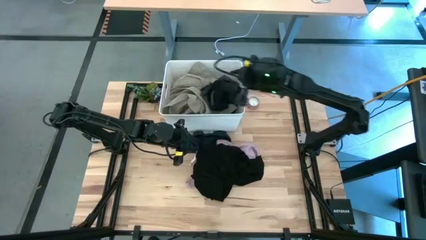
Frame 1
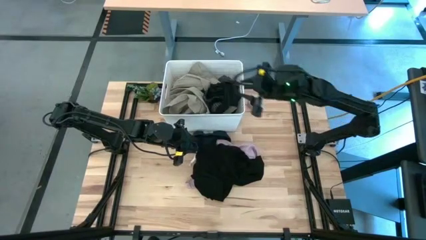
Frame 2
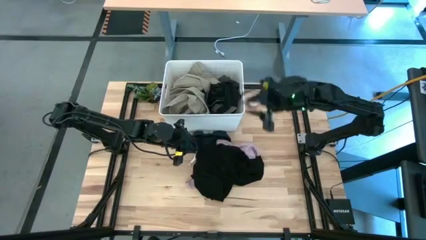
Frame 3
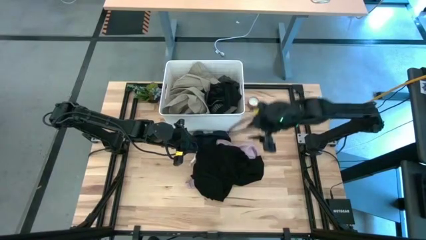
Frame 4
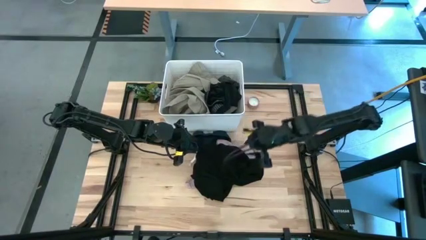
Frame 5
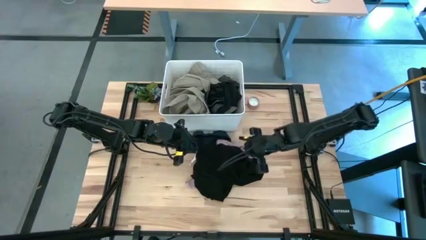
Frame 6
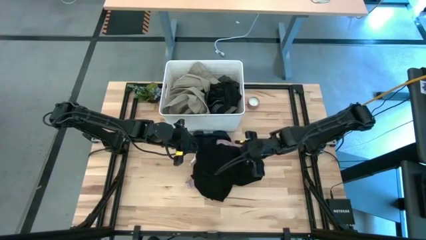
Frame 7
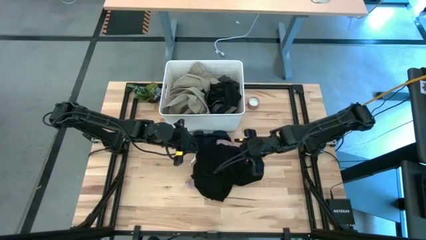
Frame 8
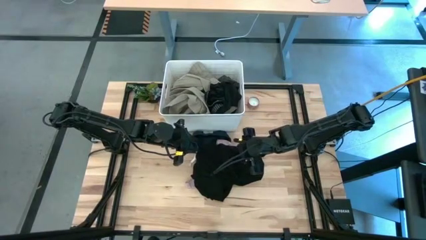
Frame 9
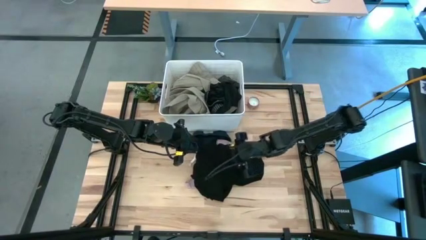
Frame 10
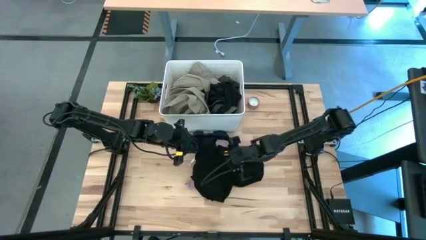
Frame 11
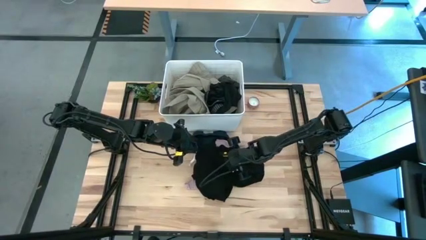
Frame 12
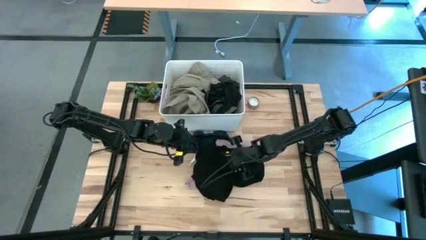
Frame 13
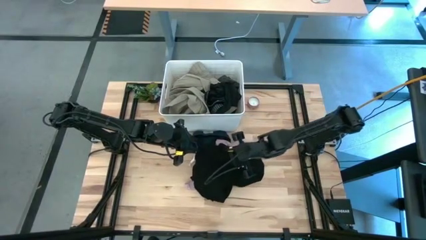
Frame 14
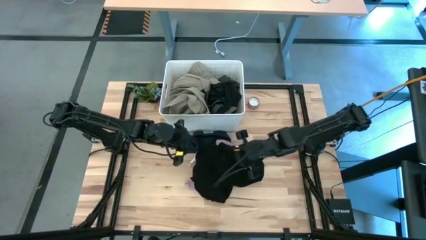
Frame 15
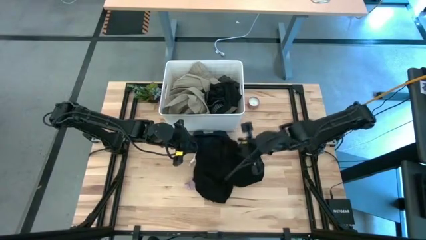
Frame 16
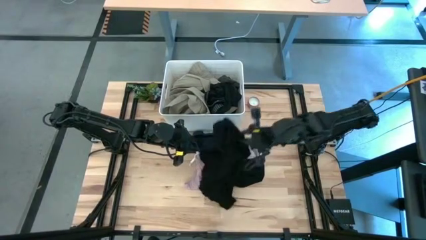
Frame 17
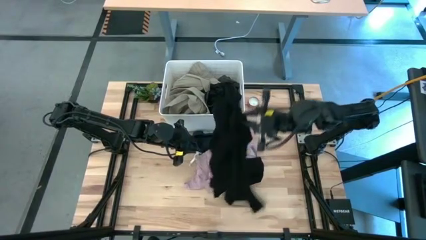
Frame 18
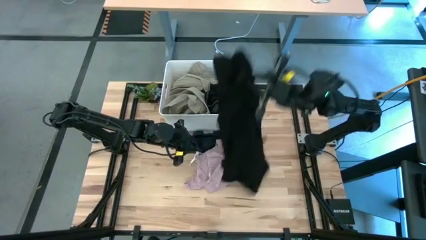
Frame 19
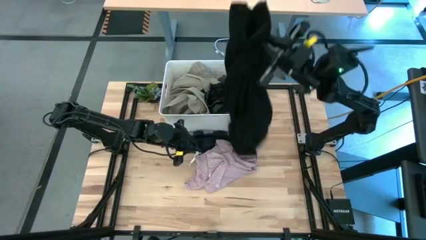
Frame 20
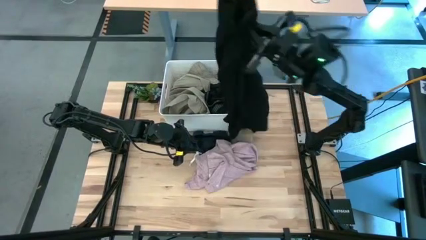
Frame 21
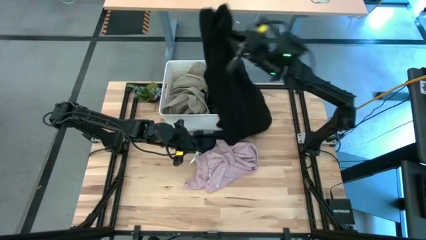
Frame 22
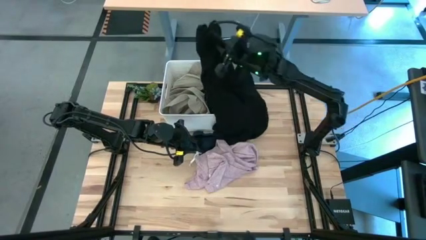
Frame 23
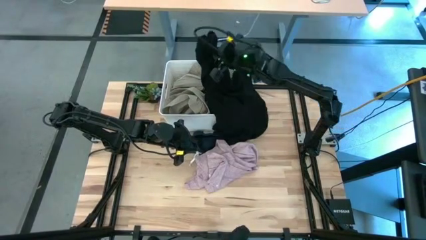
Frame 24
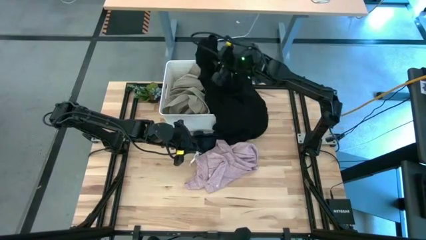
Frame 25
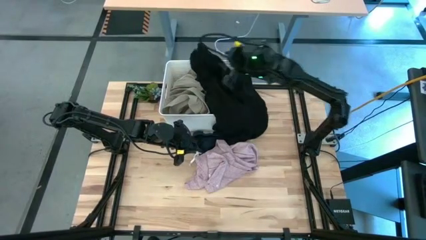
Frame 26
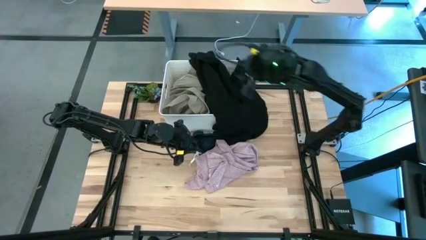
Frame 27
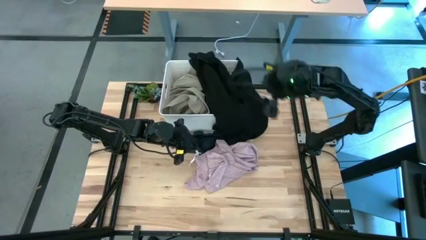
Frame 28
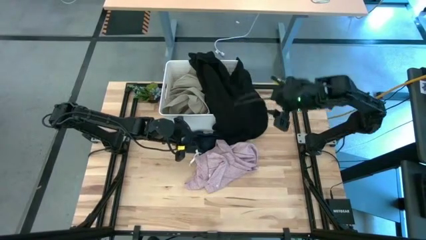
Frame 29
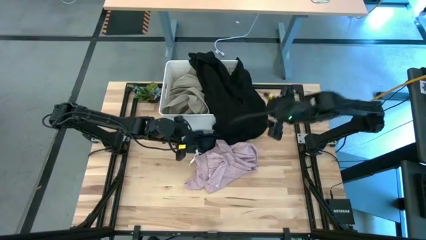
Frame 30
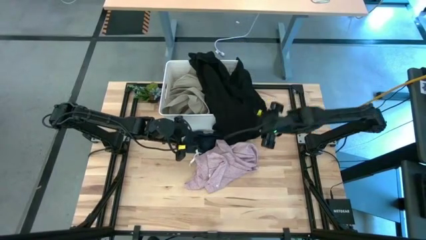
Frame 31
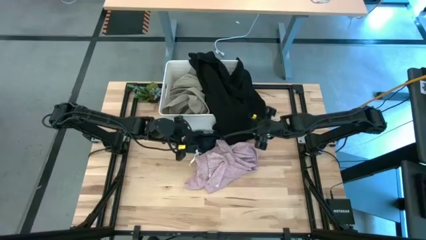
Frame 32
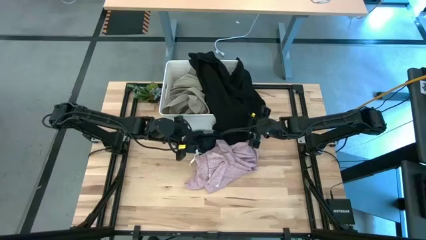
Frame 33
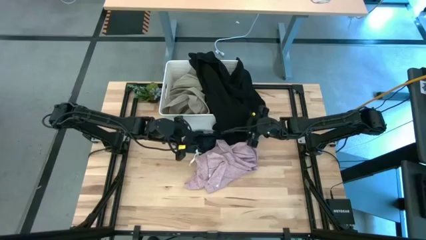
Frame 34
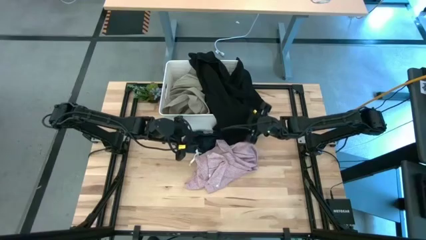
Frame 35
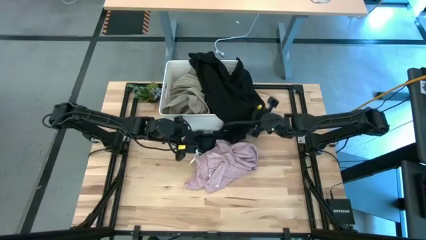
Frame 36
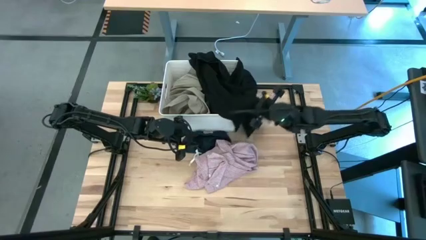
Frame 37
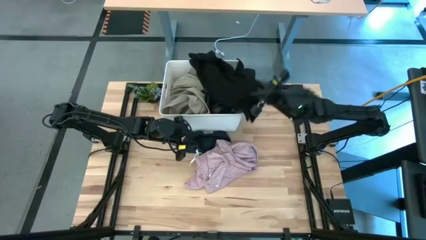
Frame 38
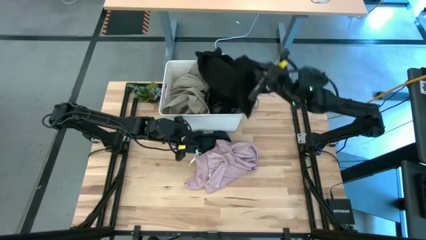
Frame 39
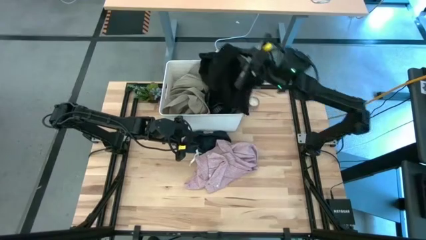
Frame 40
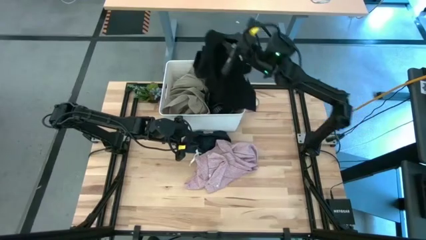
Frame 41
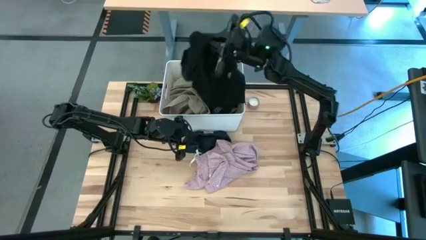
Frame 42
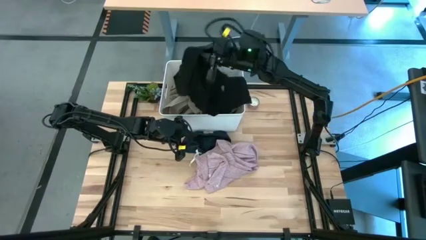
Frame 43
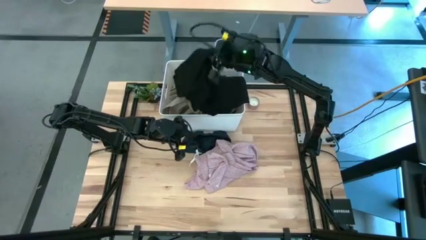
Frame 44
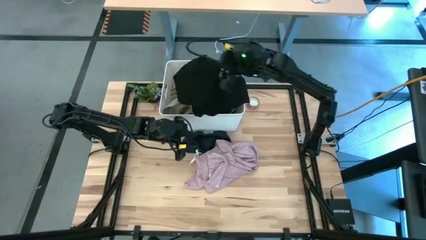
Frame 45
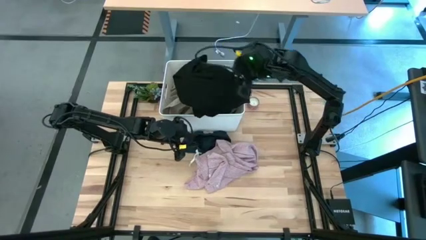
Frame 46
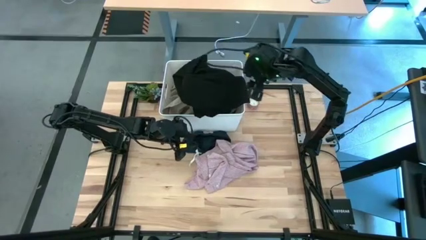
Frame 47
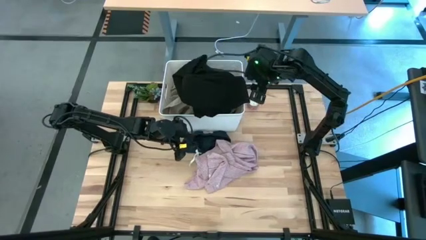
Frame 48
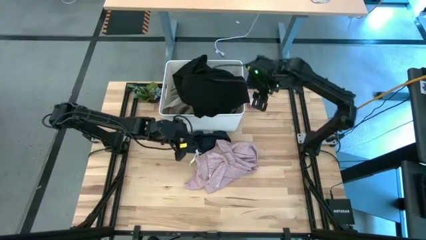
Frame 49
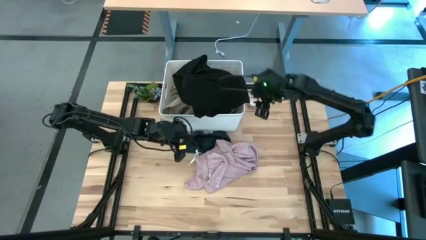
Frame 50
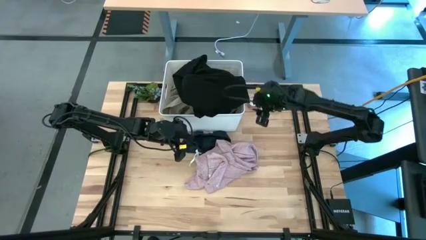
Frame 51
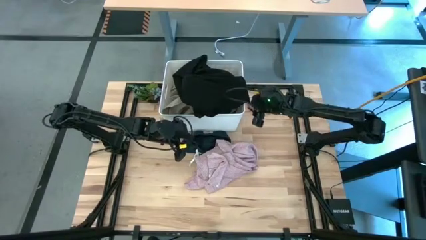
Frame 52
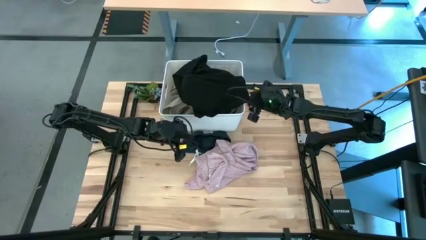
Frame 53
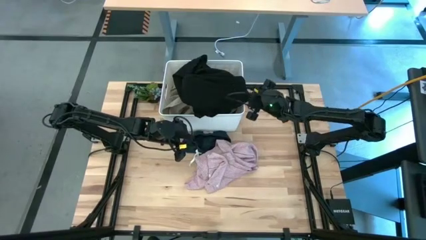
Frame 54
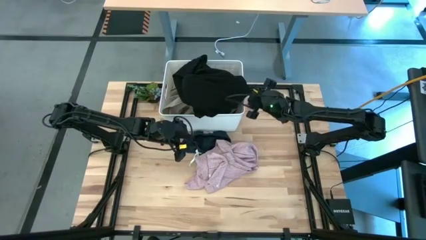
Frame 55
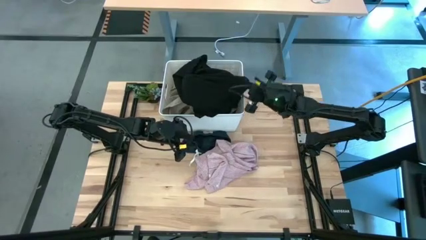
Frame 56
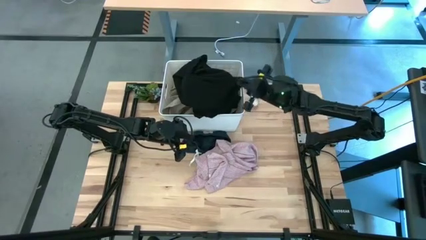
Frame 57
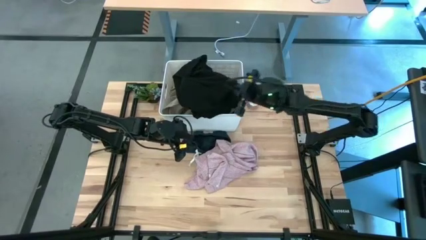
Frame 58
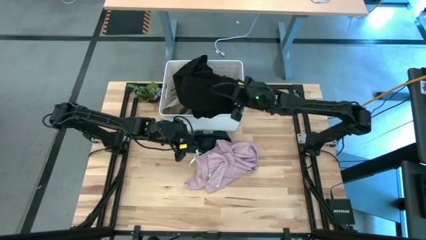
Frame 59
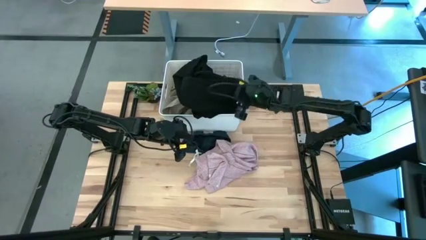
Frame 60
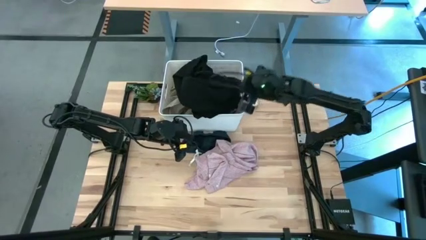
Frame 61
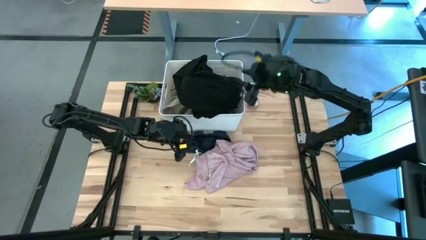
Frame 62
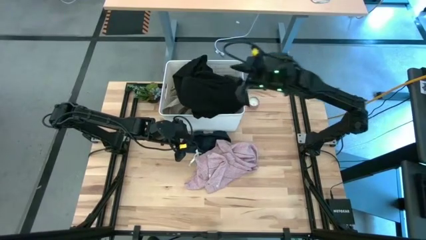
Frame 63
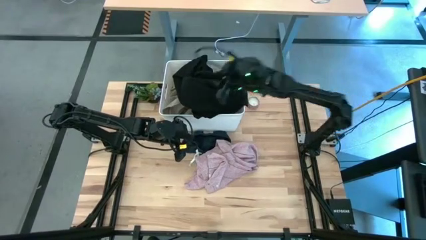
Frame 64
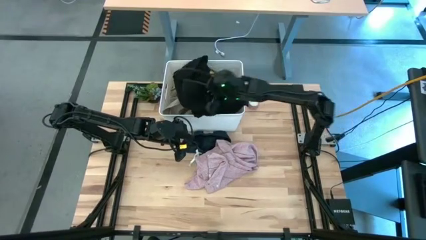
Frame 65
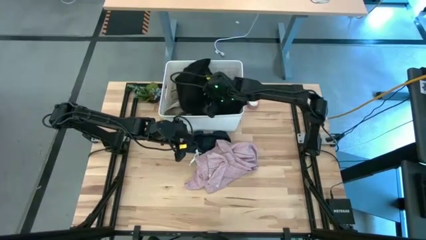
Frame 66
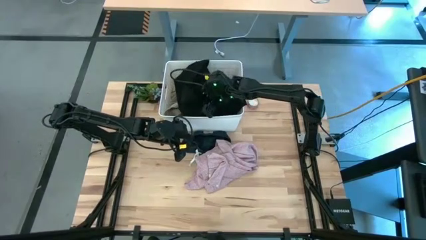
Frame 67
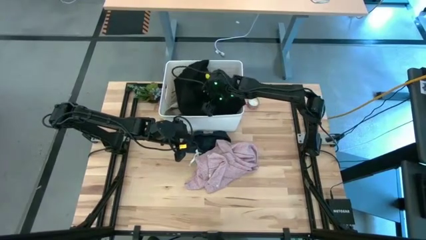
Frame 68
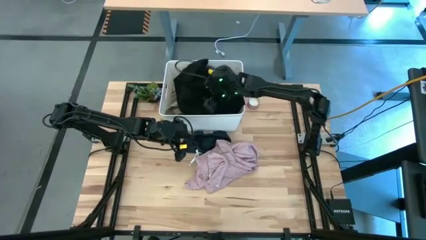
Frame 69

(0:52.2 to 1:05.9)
Task: Sort clothes
Put the black shirt into the white bin

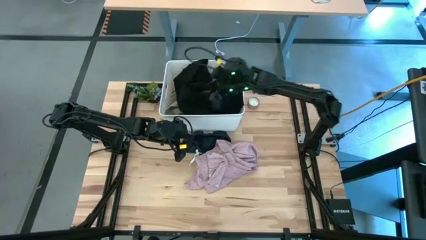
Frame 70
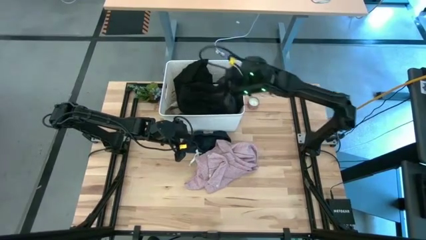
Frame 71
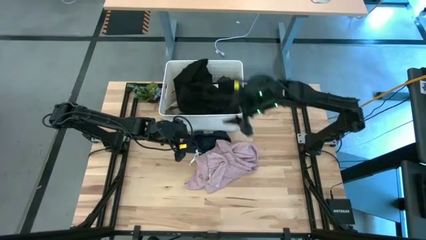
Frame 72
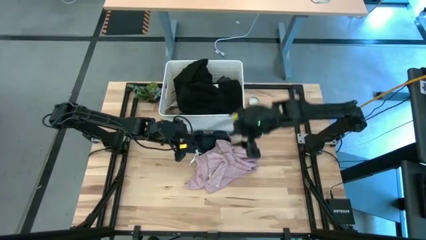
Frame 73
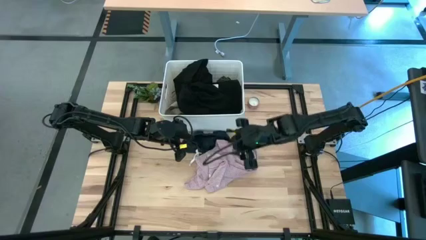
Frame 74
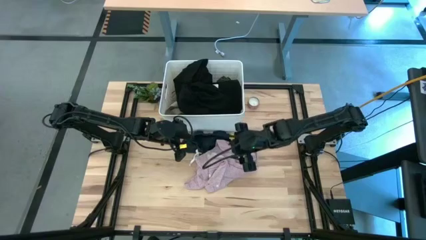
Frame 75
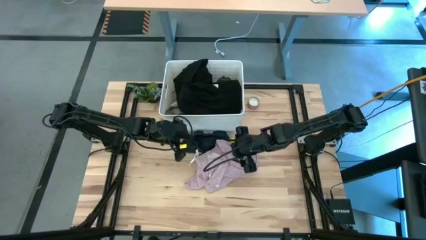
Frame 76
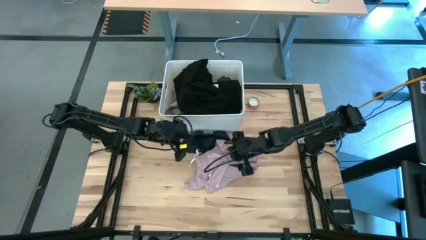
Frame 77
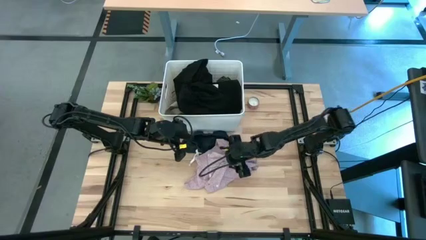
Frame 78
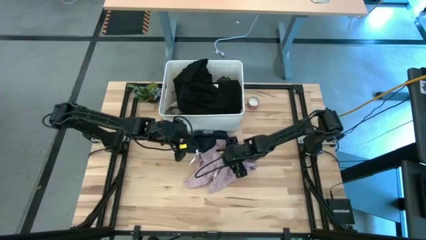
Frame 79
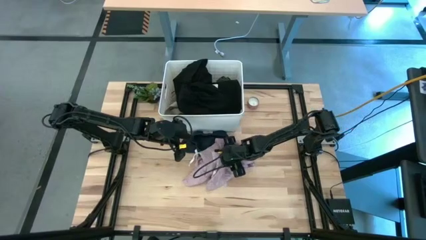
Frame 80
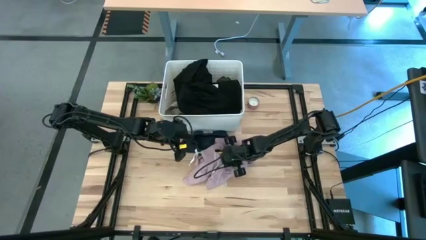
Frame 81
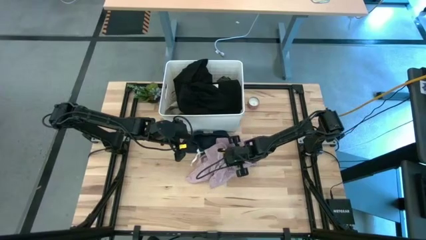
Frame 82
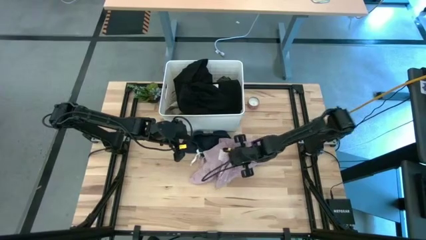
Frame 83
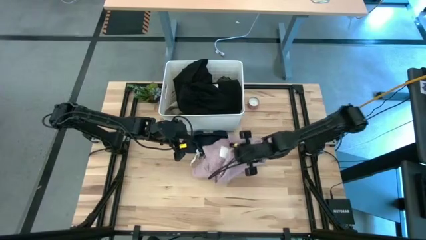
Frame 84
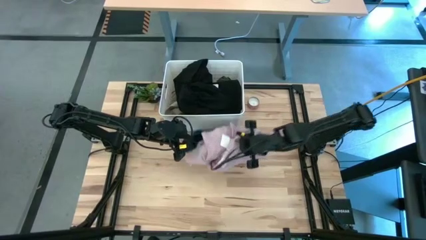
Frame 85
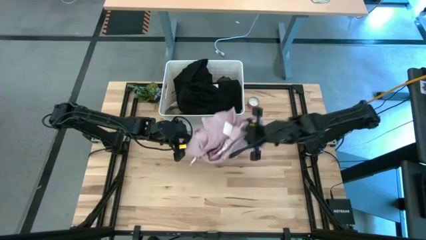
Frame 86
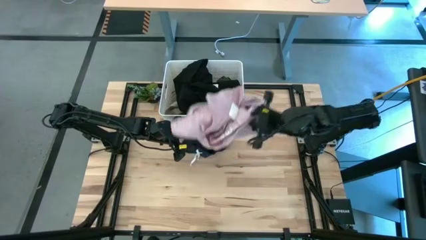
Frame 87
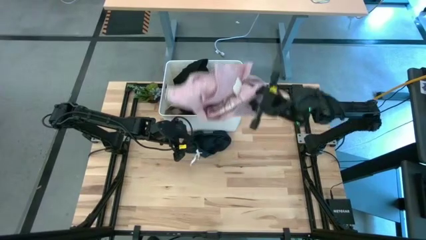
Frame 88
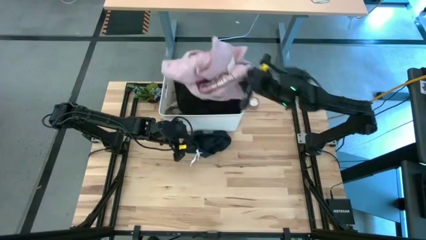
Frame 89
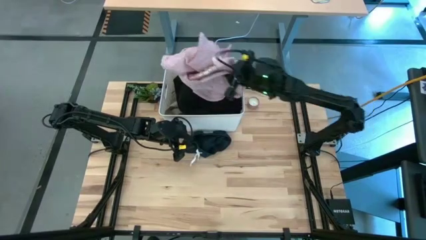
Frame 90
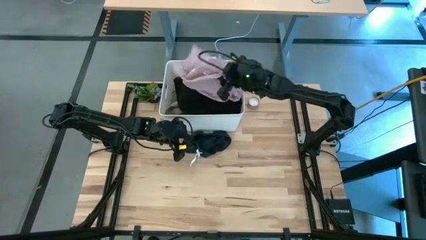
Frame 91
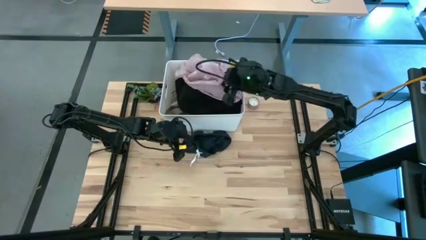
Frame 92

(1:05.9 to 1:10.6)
Put the pink polo shirt into the white bin
